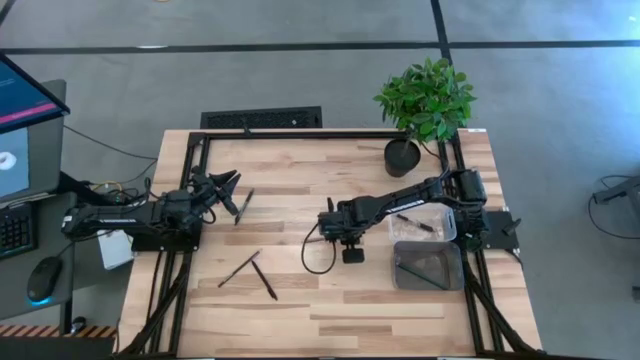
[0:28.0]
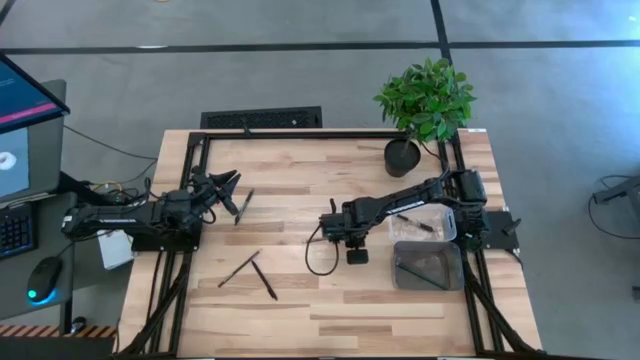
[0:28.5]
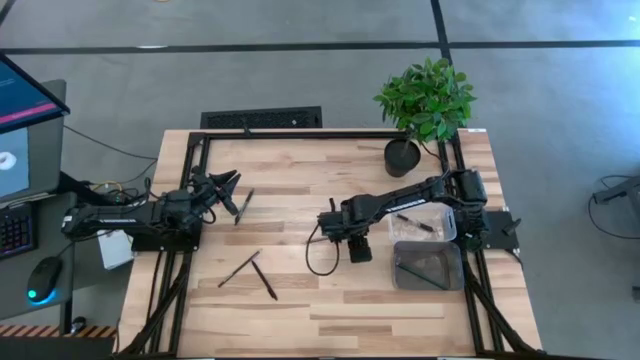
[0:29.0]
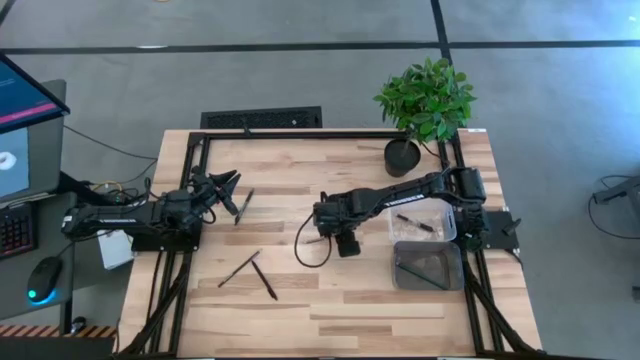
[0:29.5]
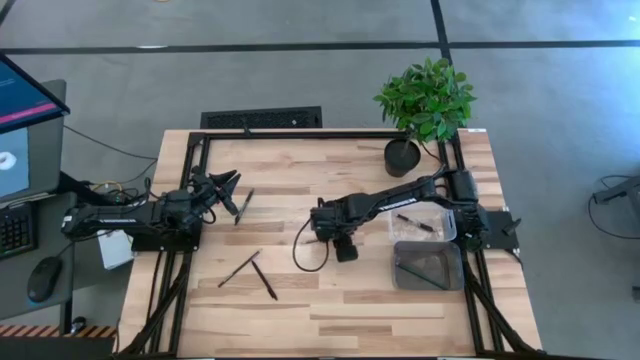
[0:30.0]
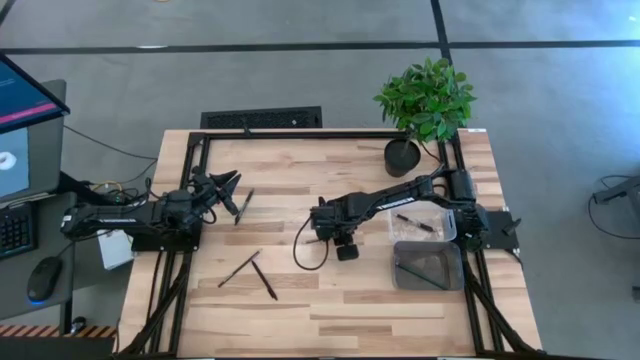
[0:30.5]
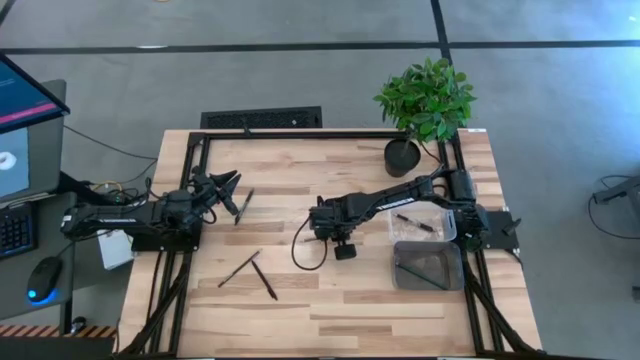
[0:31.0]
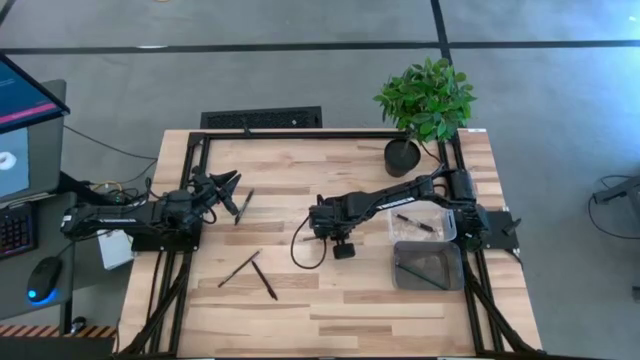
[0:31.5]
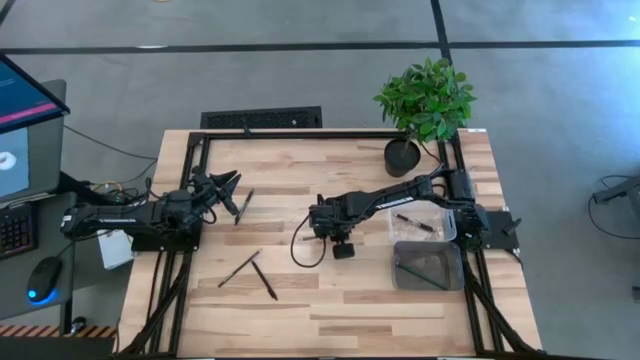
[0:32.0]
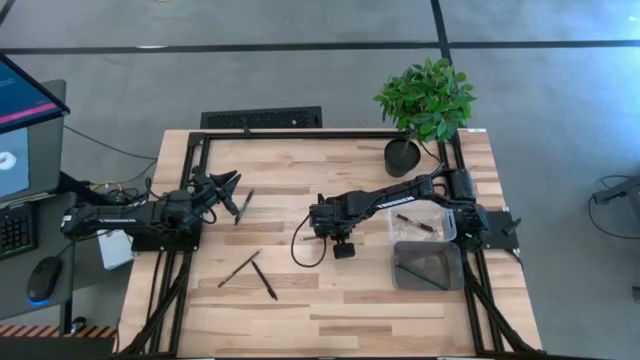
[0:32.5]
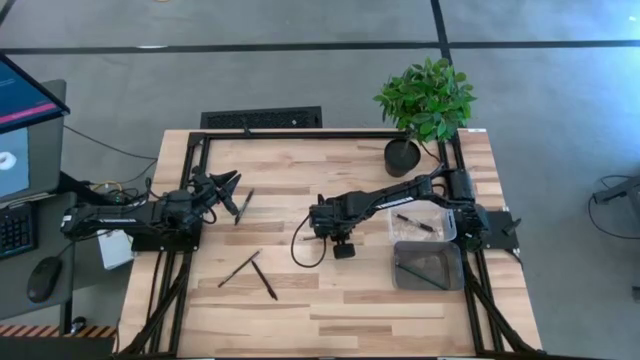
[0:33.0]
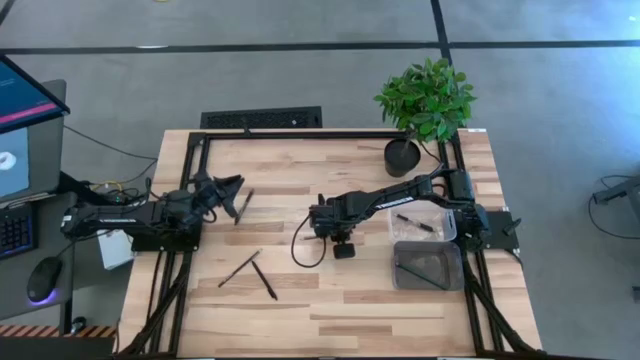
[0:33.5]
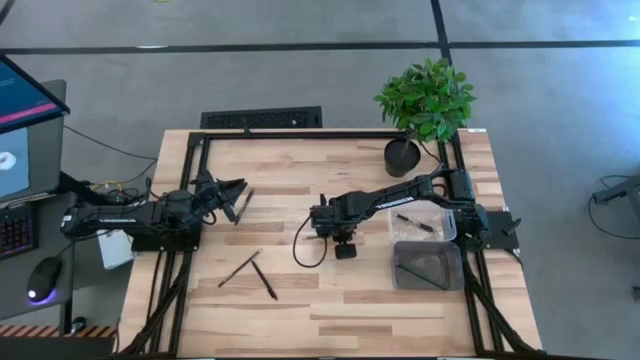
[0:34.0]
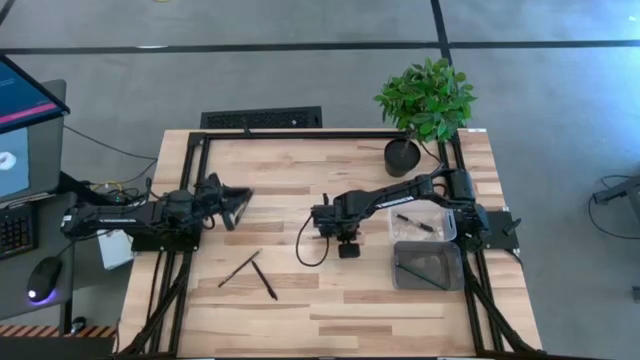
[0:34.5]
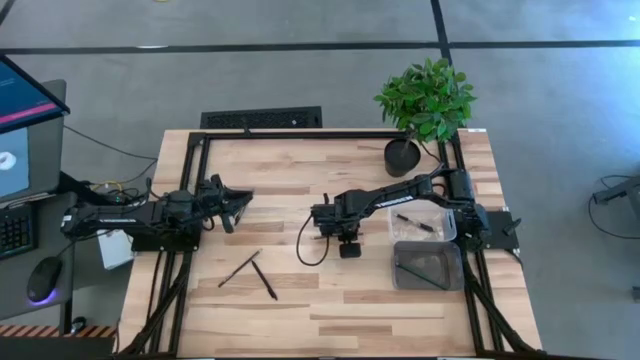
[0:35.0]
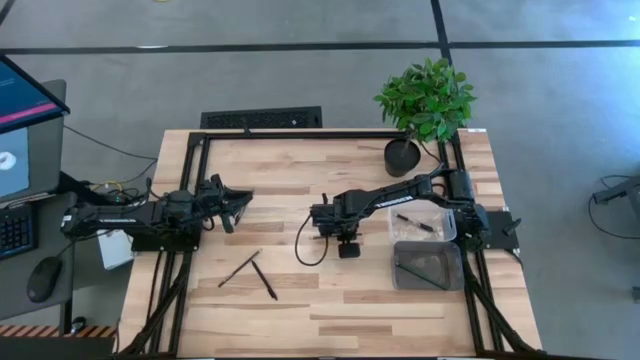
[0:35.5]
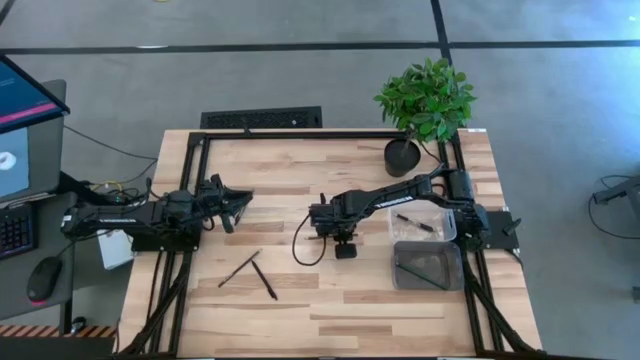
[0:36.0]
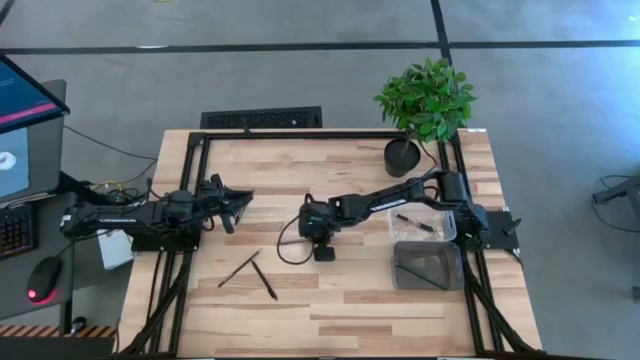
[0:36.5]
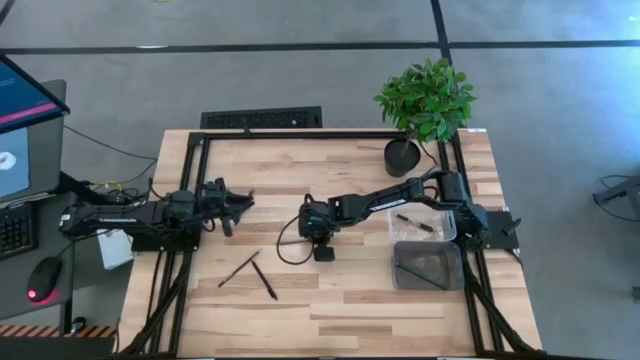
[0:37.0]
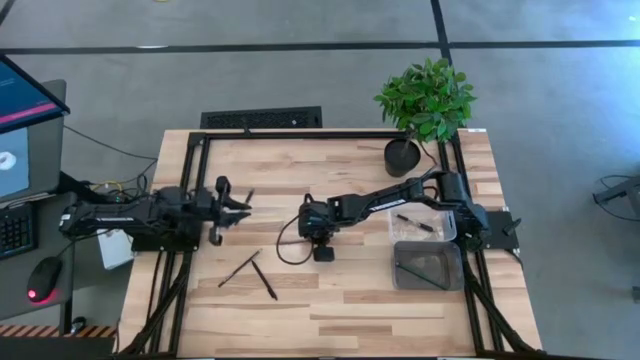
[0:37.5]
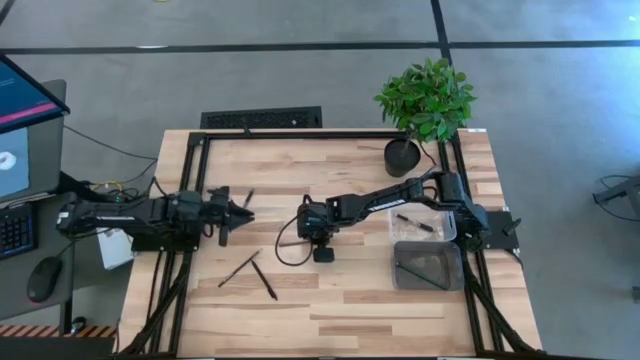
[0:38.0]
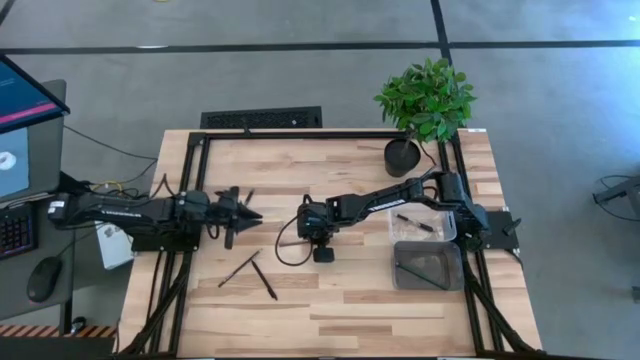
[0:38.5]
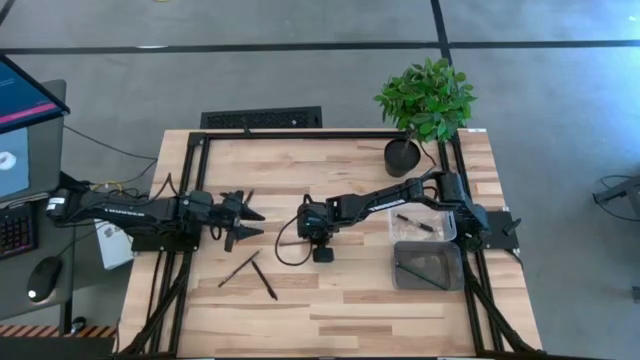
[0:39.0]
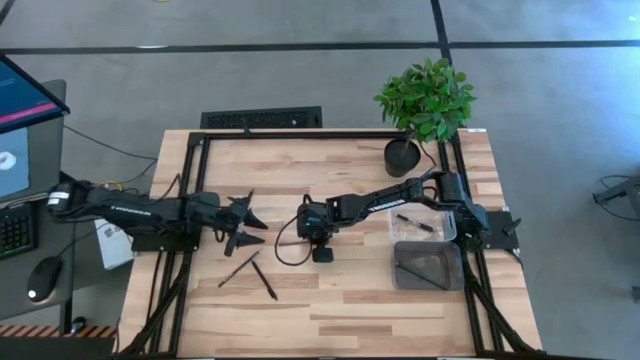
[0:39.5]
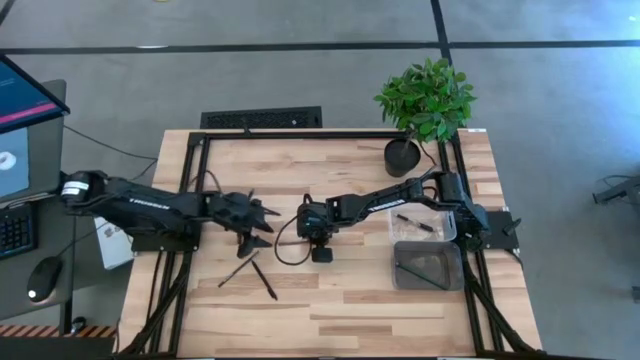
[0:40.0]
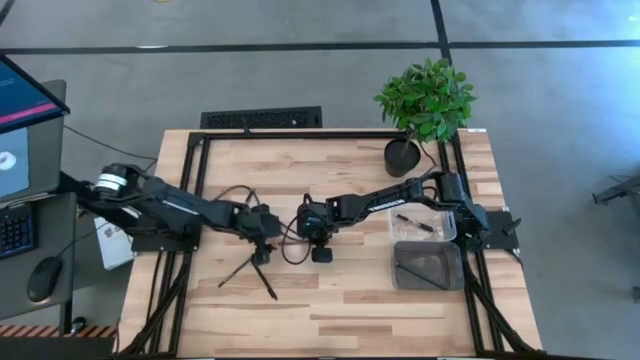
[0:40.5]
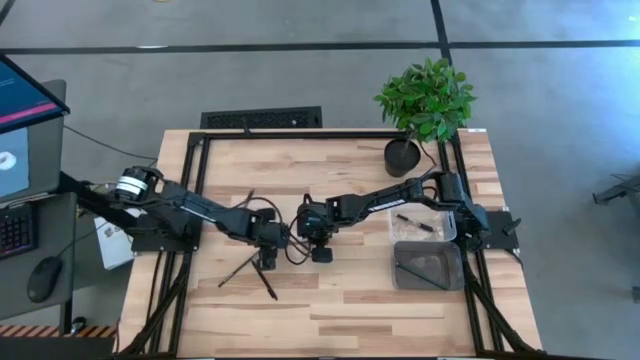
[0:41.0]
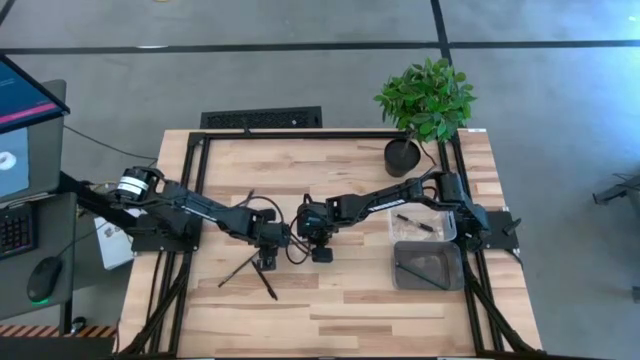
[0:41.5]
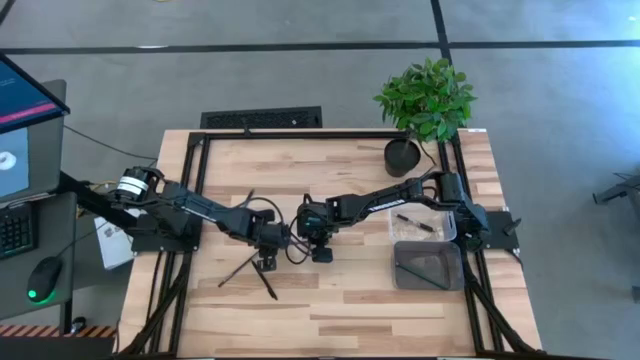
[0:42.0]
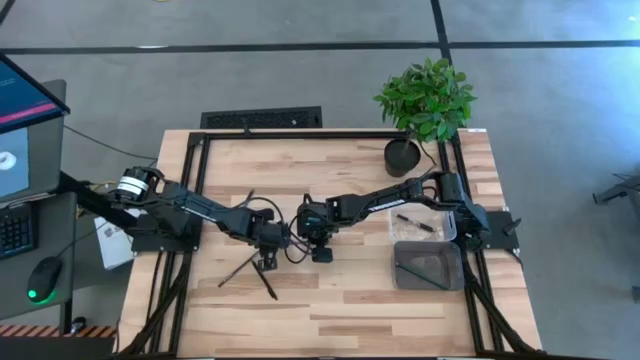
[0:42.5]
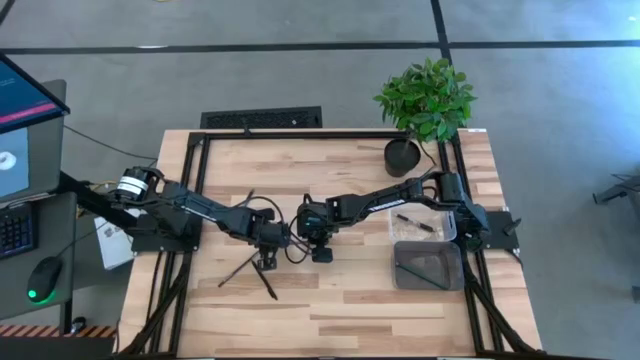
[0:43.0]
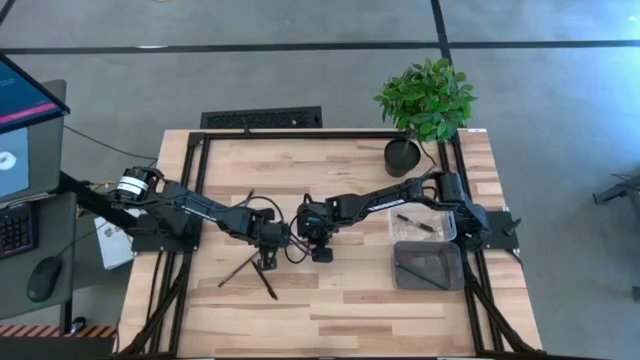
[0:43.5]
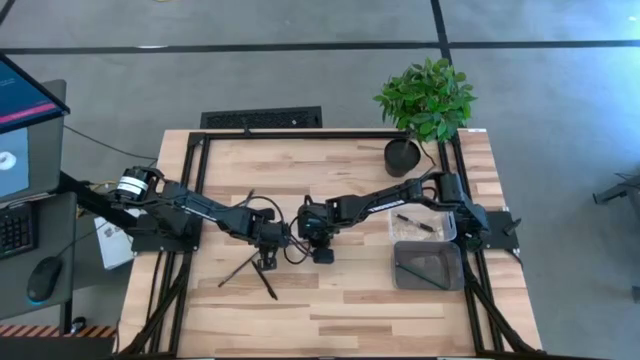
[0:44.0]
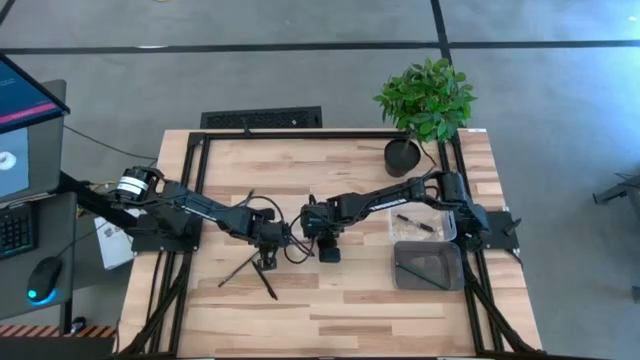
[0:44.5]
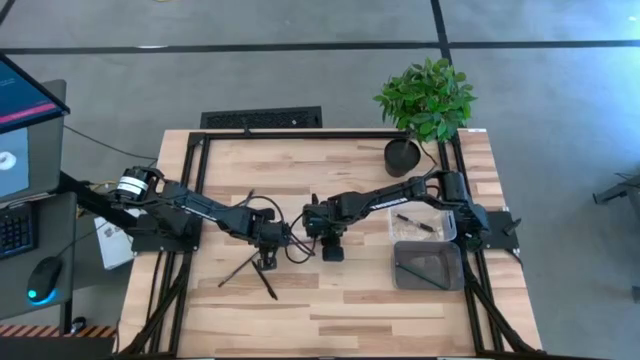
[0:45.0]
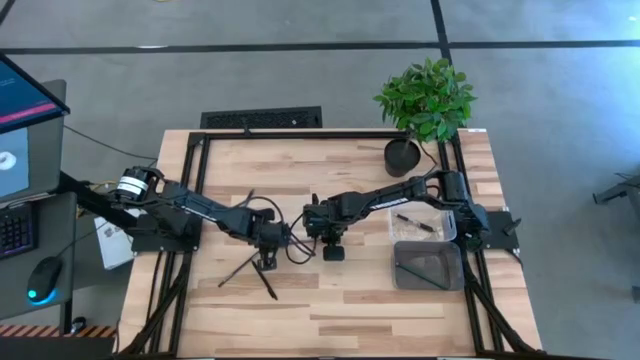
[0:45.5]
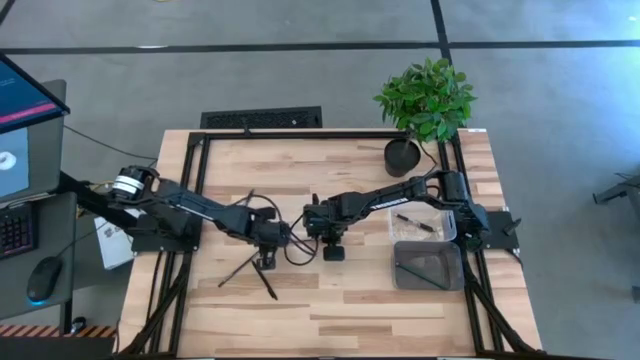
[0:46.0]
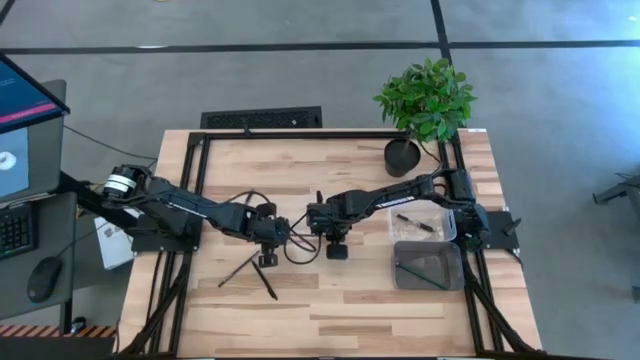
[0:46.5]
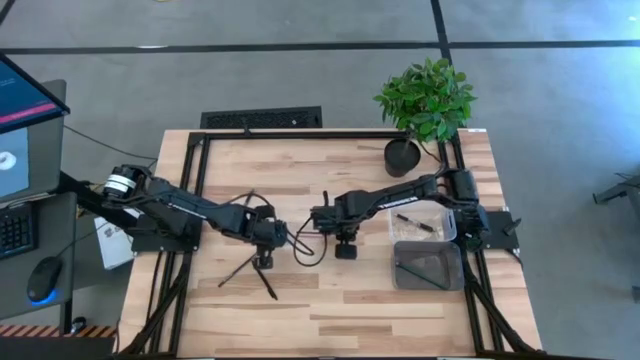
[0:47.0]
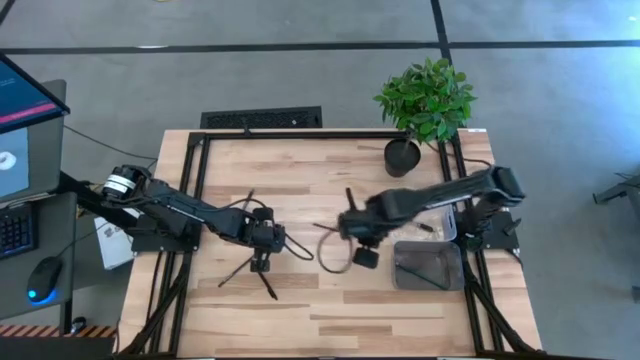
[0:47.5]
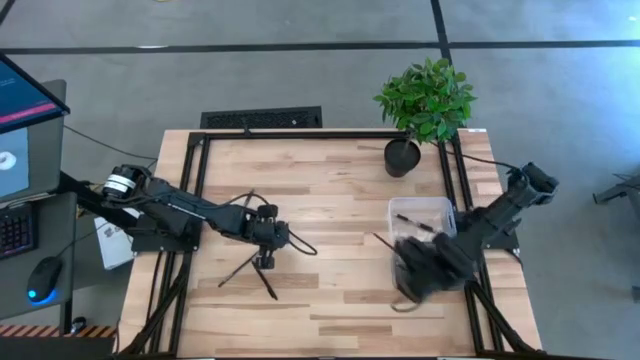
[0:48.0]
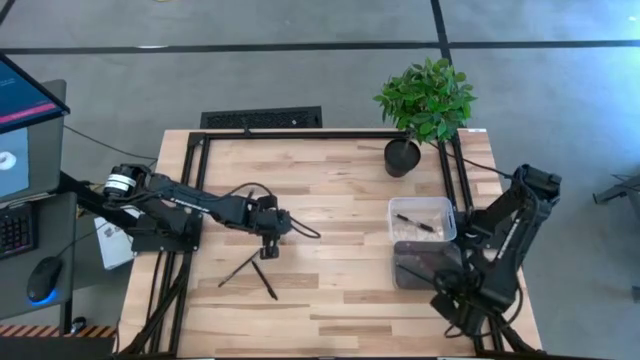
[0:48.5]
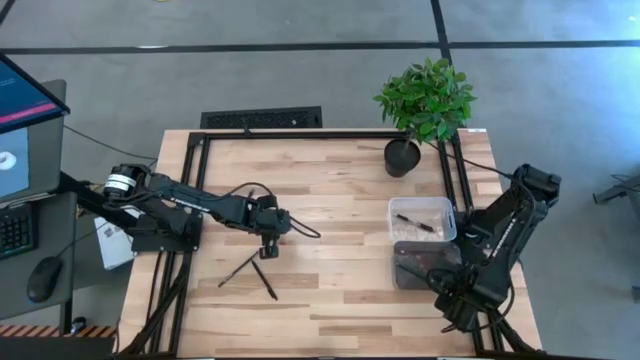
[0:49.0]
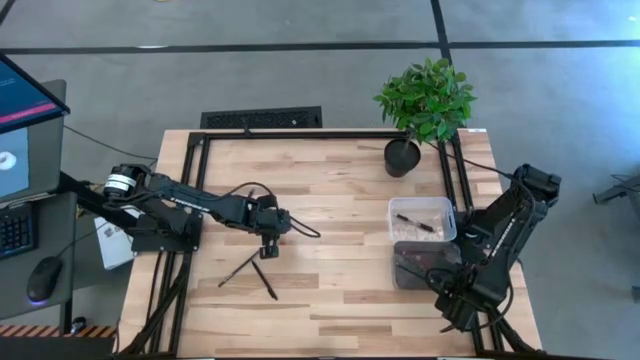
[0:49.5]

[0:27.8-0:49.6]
Task: Sort pens & pencils
Put the brown pencil into the black transparent bin
